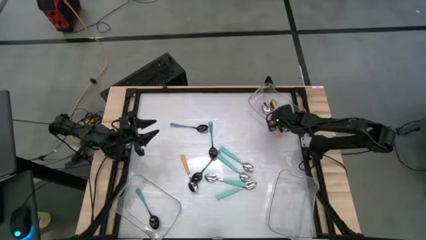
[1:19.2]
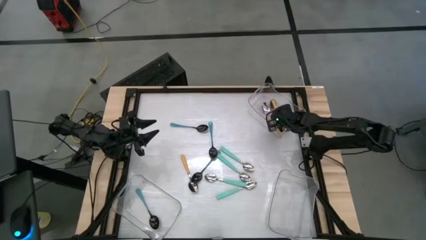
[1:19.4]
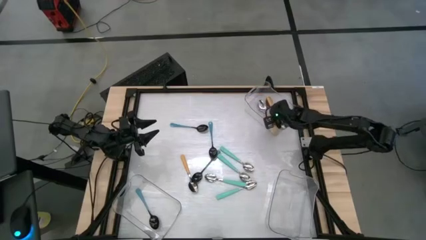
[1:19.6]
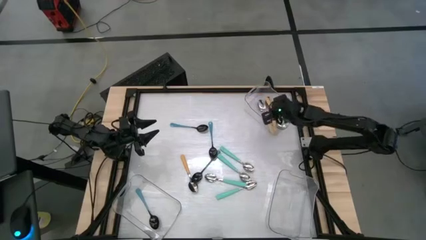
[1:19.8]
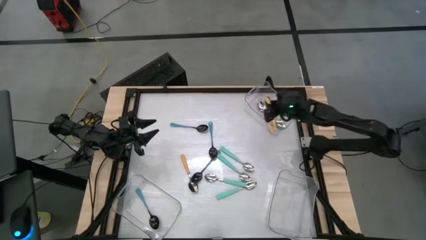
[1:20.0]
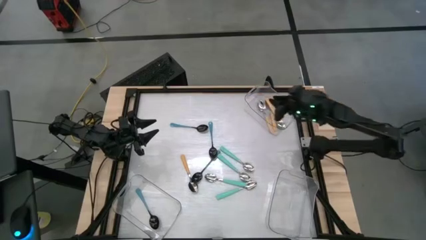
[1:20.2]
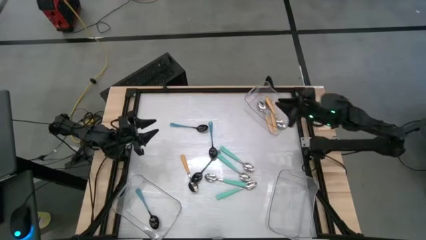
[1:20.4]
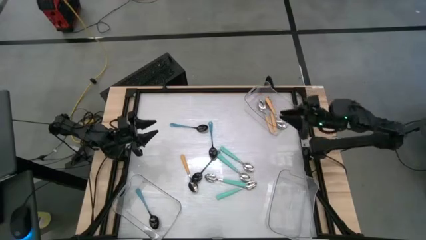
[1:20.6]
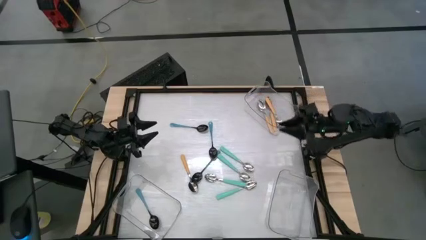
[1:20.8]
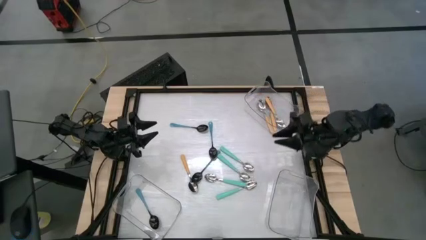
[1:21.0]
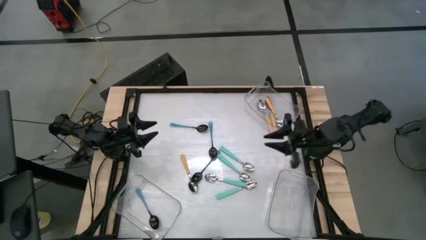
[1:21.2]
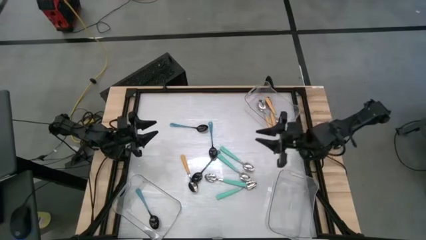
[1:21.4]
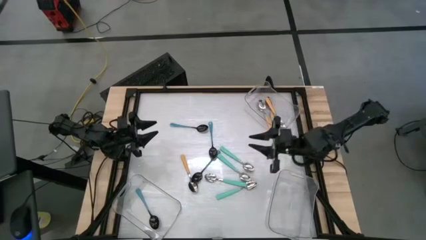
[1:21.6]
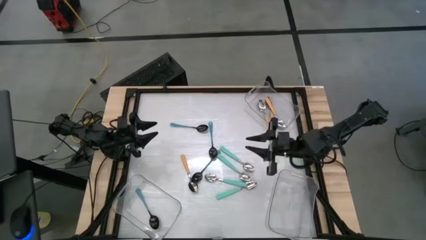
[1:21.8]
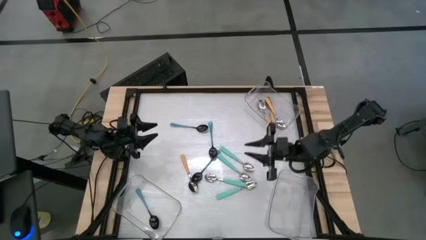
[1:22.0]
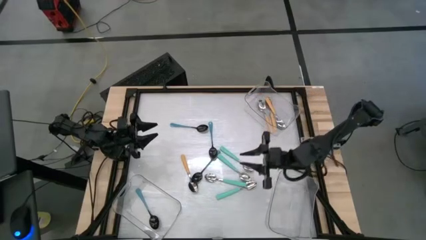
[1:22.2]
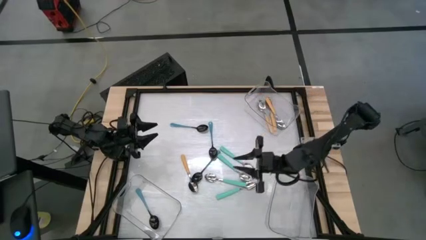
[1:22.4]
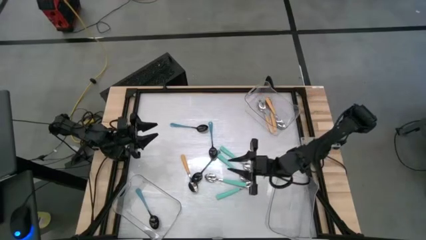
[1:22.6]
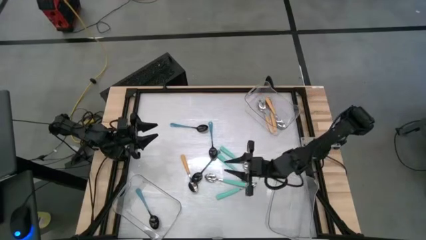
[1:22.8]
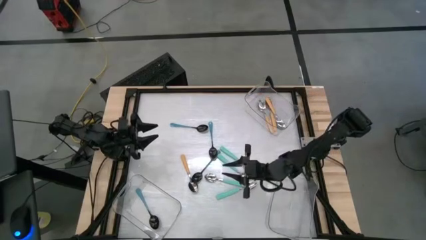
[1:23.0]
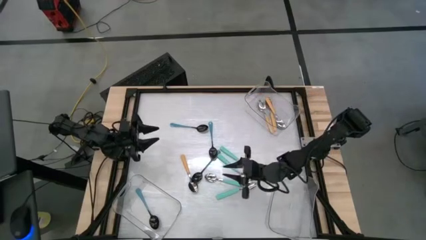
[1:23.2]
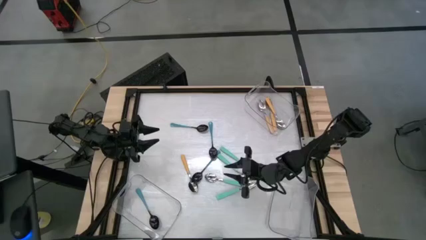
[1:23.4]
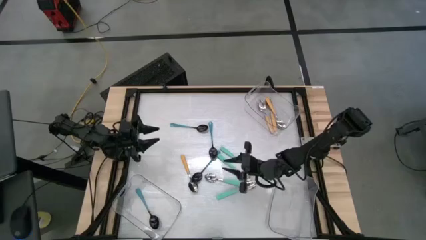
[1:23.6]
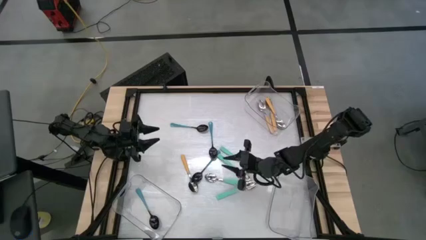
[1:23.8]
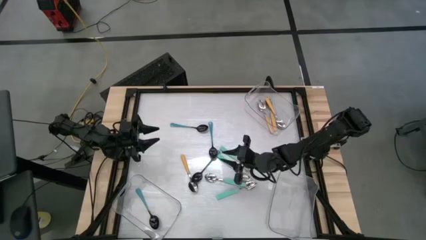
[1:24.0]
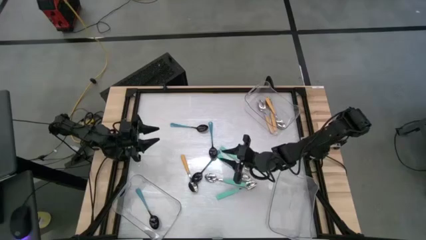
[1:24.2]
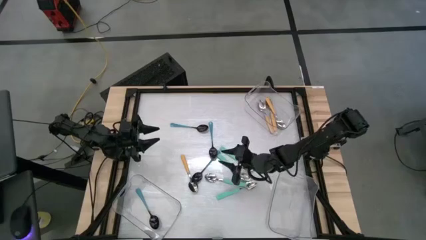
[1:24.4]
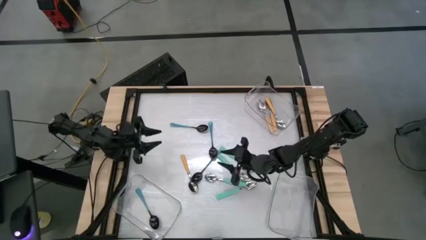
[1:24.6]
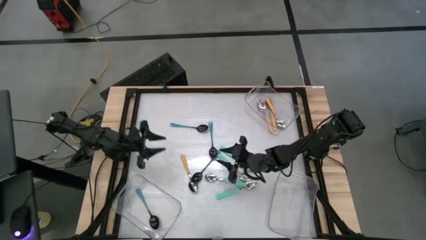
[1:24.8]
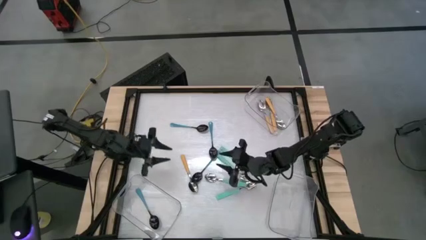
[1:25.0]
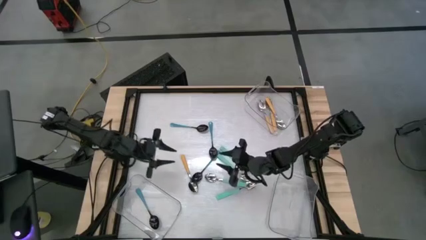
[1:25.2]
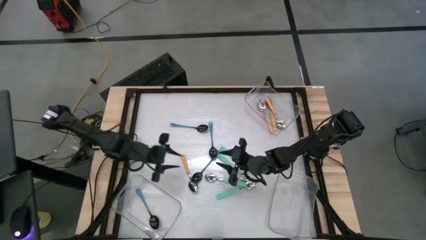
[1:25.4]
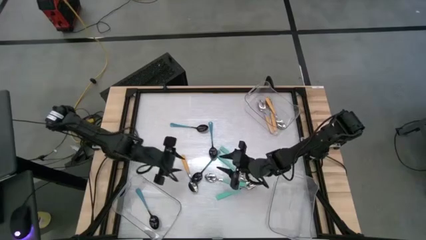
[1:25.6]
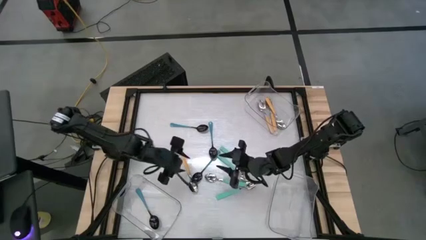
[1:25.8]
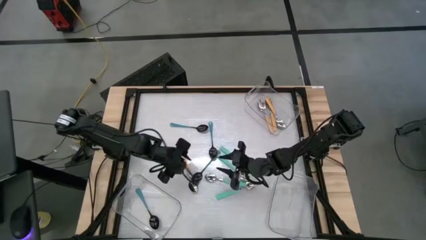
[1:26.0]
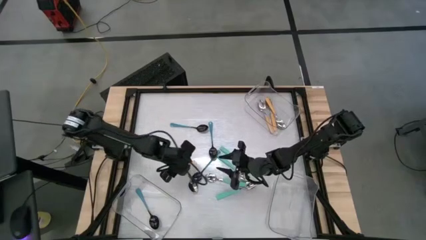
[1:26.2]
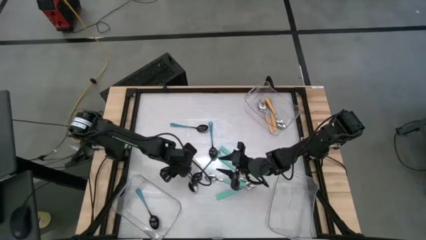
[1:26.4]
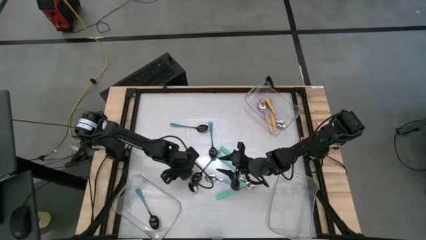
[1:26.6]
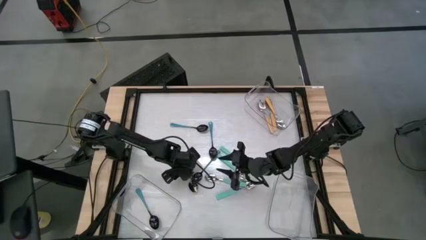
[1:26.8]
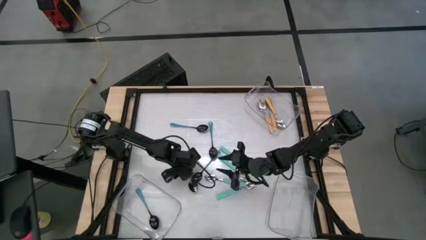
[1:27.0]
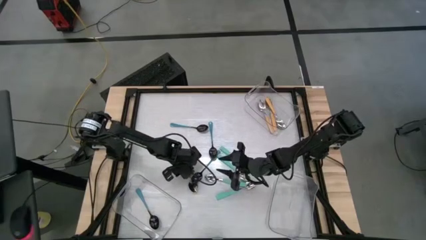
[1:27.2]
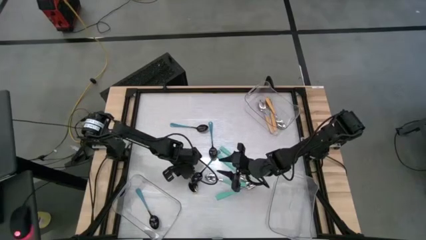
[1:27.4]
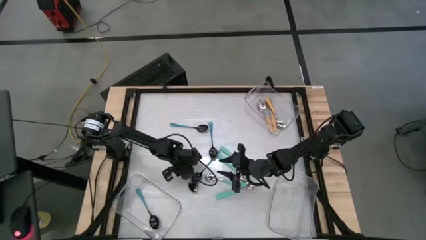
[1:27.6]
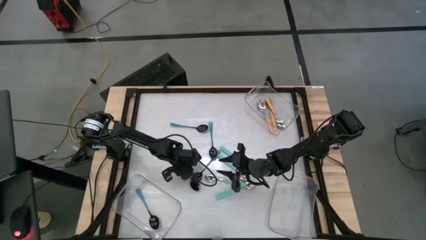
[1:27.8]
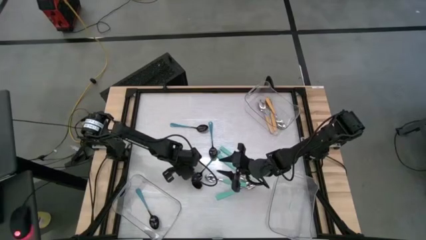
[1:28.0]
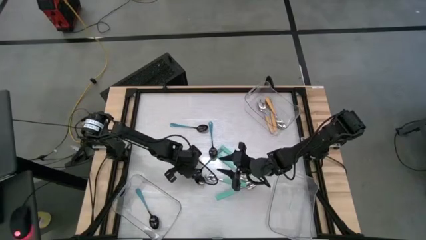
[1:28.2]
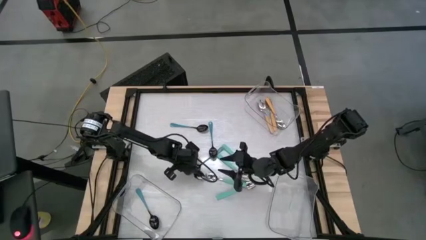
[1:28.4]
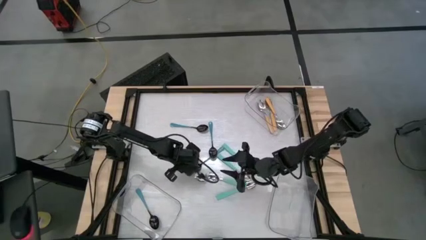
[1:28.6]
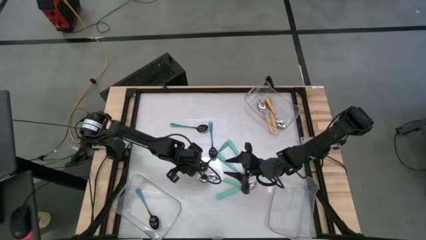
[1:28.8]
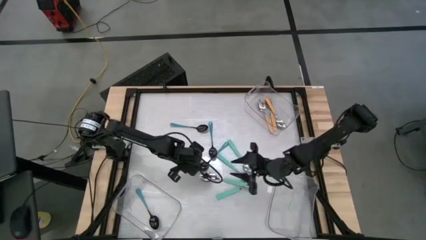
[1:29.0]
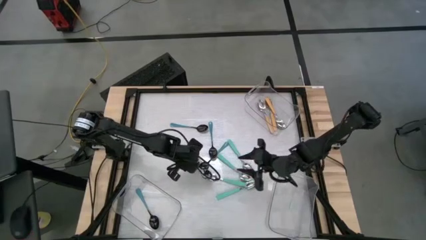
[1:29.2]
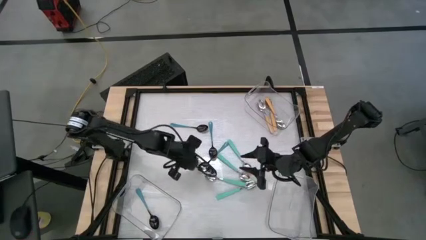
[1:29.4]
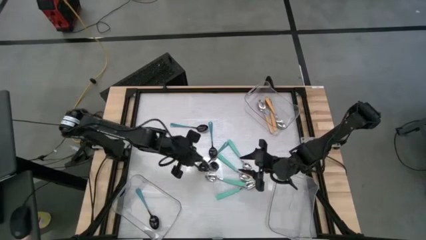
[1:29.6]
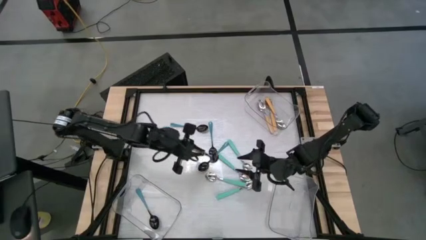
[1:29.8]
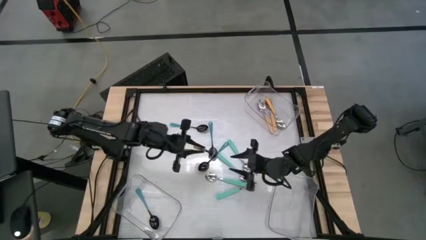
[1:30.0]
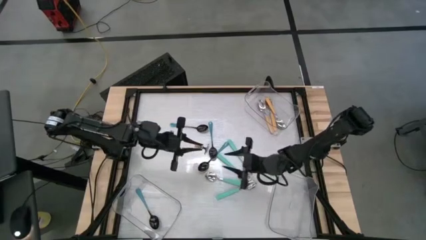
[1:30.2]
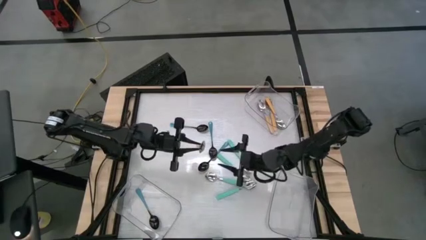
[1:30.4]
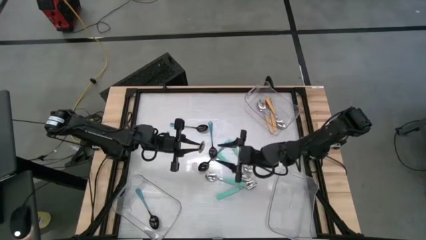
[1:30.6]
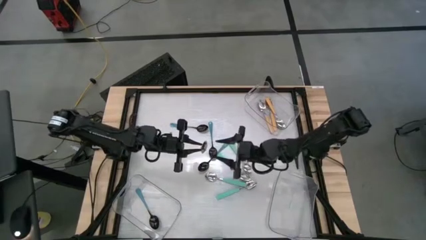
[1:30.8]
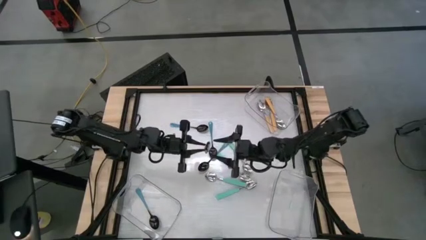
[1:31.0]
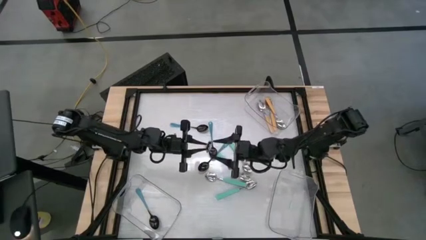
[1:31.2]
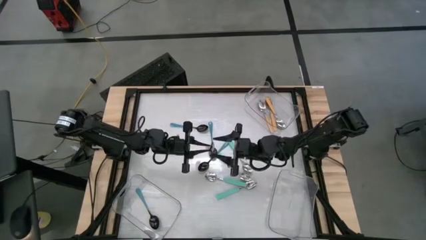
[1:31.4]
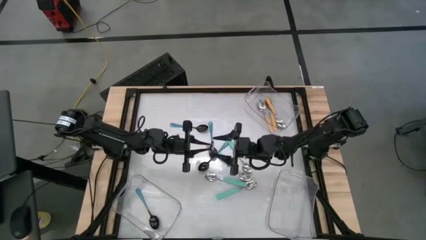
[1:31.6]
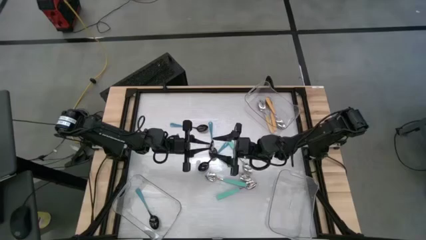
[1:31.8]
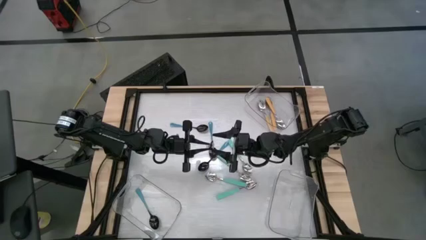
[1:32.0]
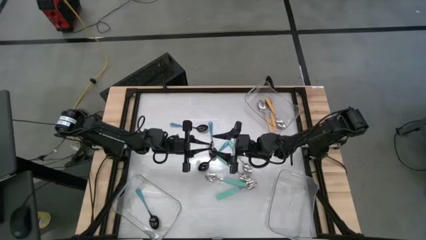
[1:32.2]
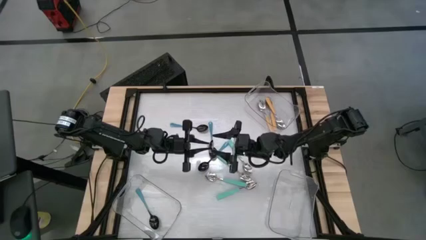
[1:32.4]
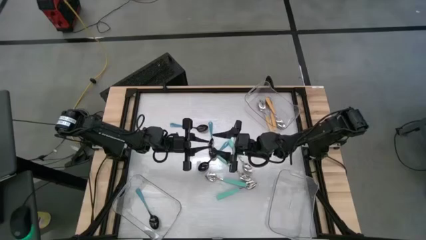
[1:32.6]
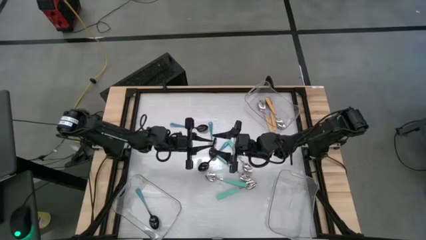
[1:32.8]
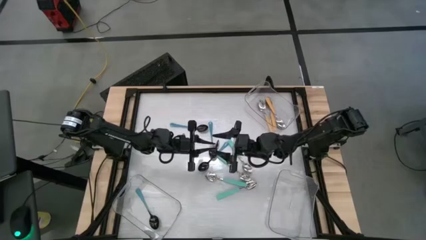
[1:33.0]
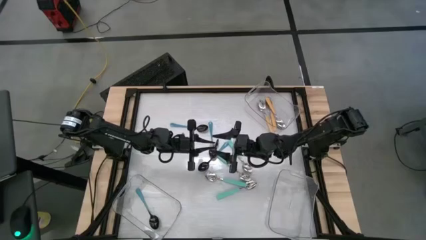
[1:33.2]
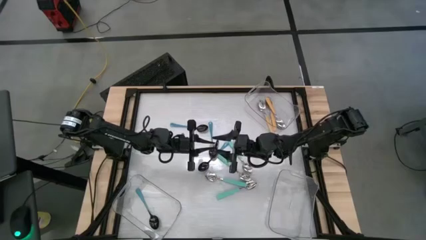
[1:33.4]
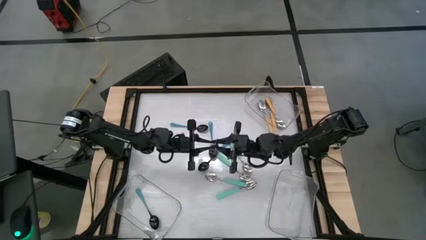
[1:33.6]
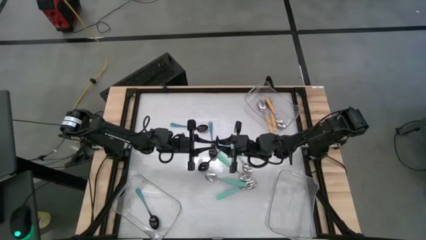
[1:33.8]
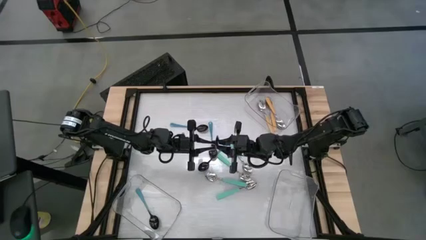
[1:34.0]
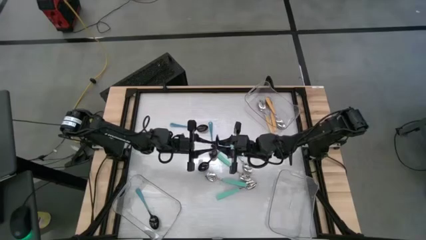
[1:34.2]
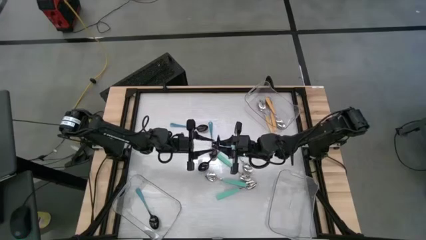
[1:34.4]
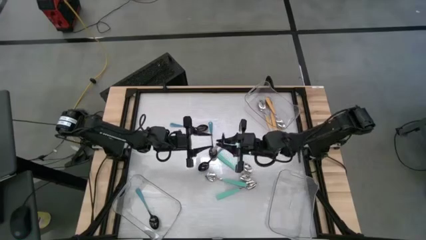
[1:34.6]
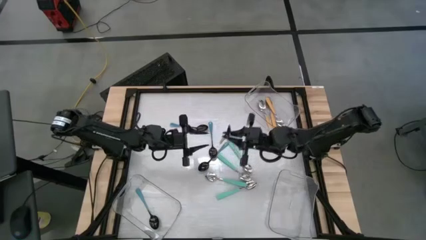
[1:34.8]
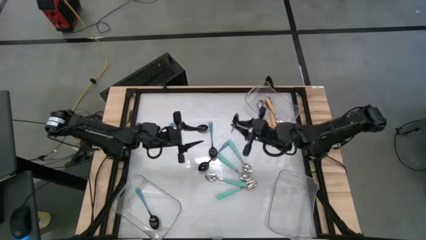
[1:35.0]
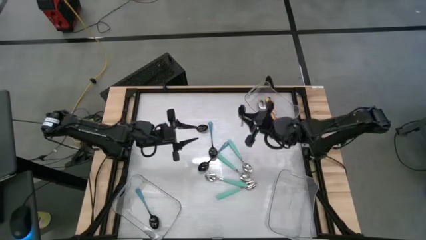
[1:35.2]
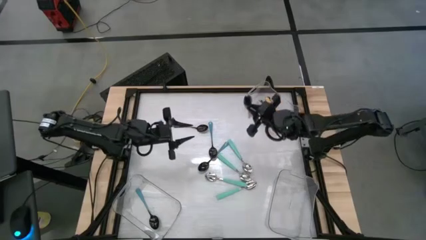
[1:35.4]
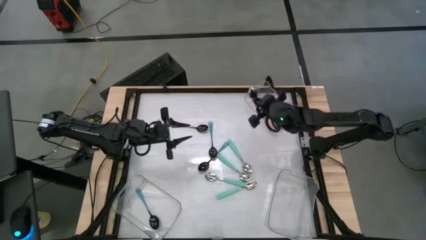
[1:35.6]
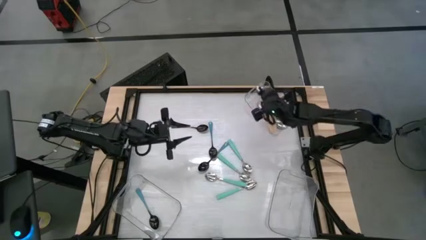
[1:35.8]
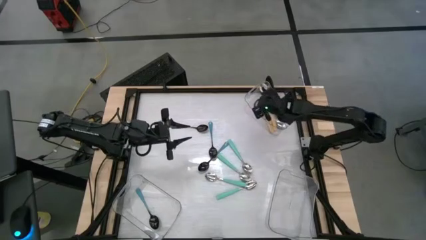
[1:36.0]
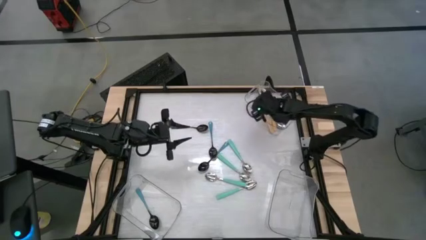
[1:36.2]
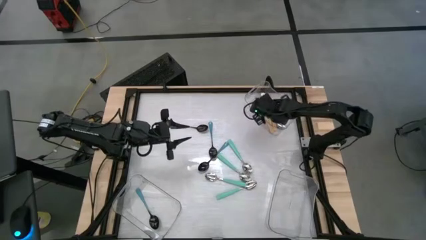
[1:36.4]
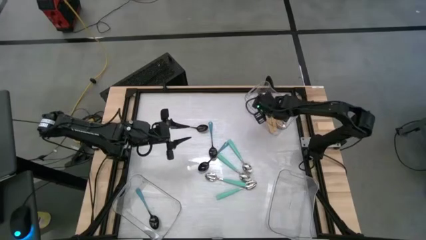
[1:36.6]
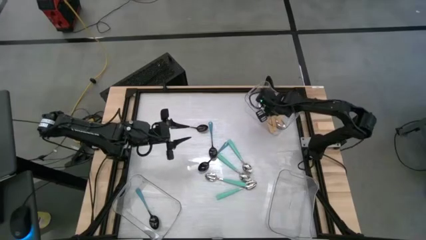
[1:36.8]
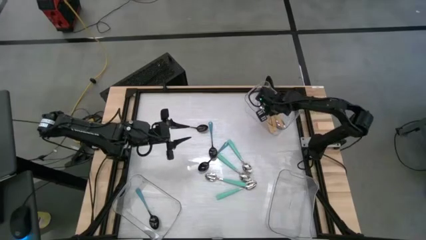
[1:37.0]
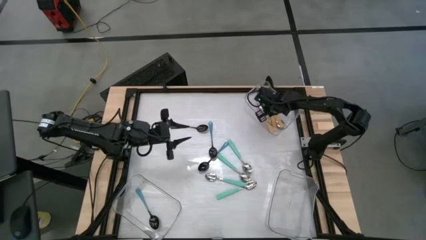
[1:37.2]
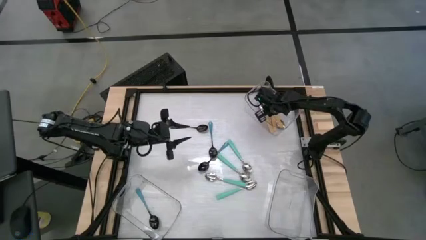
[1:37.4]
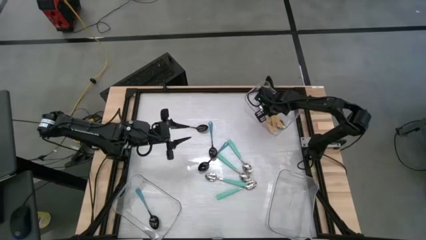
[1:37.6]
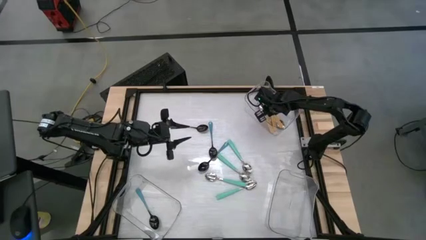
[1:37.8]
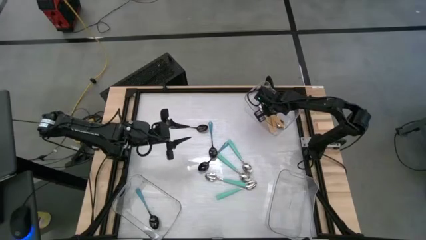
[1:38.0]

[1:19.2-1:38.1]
Task: Sort silverware by color (type)
Put the yellow spoon into the top transparent bin
